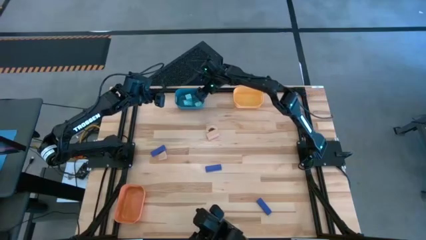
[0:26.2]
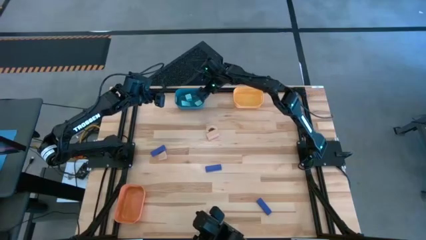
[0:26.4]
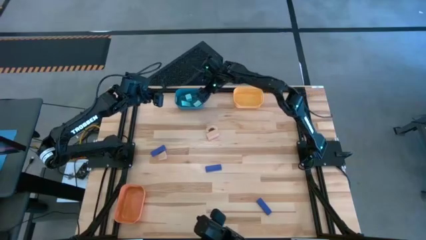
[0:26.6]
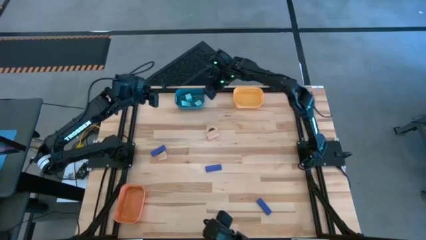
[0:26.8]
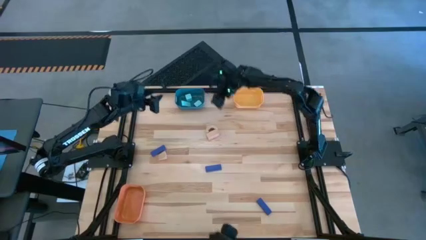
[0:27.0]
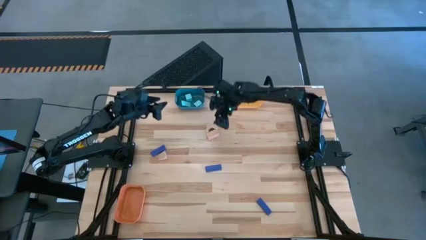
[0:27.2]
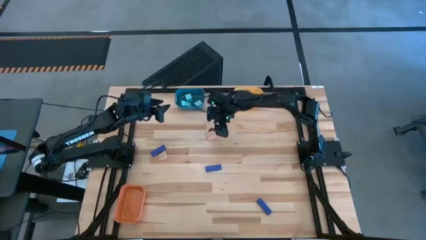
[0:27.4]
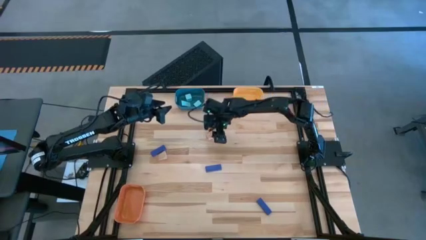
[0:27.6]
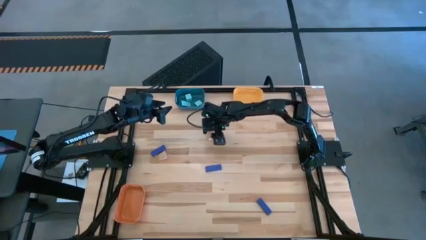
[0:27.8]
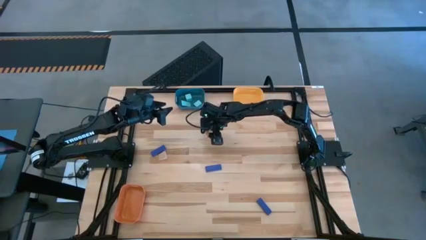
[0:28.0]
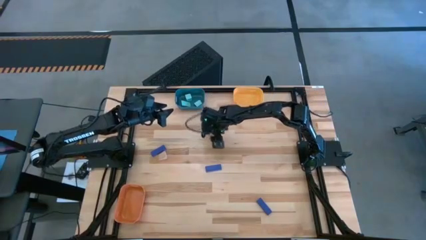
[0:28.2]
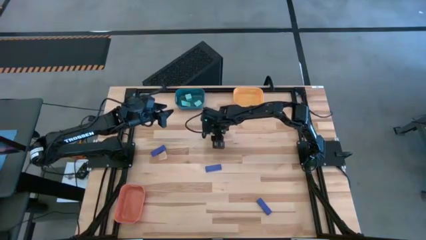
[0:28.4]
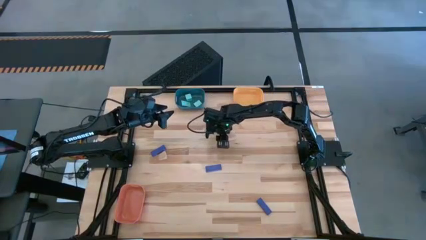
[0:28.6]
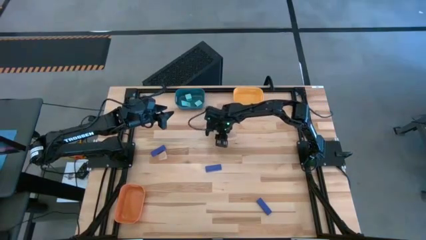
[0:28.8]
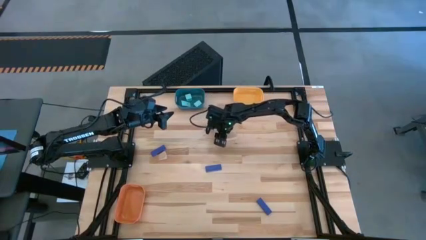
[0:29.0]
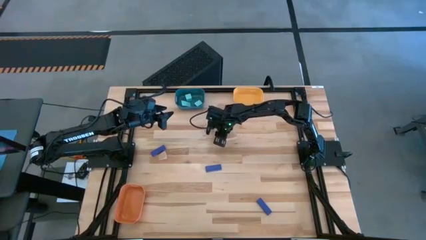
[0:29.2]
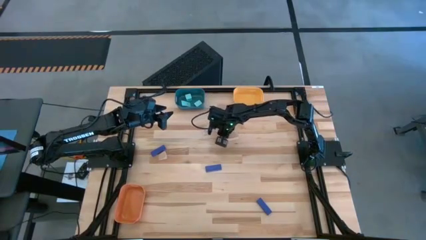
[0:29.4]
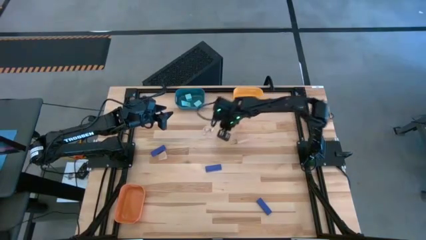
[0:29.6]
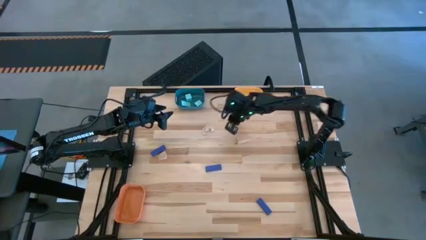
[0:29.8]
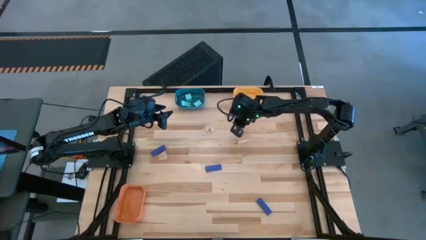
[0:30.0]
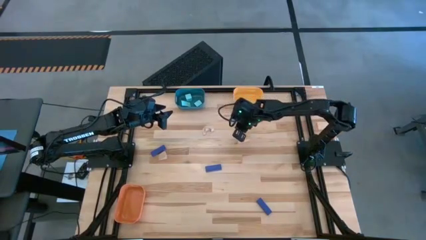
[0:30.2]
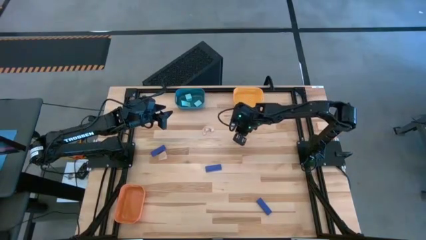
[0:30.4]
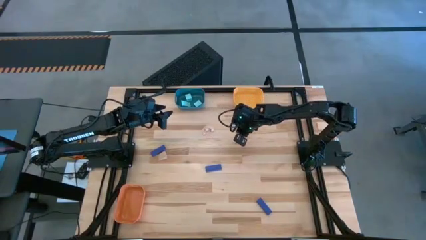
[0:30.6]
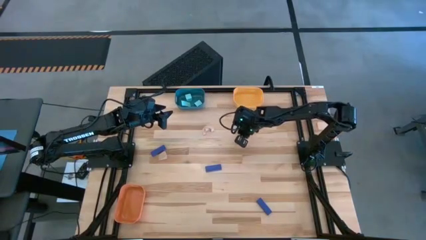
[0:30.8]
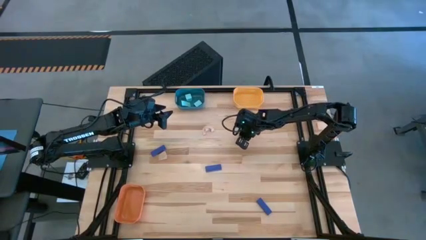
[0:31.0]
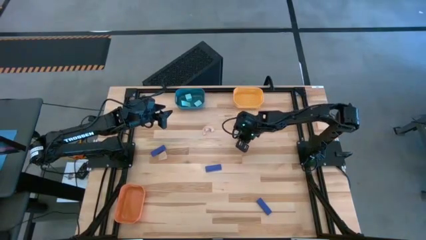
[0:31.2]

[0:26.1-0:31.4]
Task: Sort & place blocks by color
Put the bottom right brown block into the yellow bin

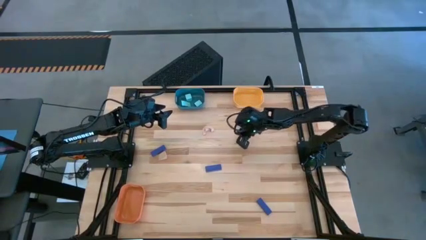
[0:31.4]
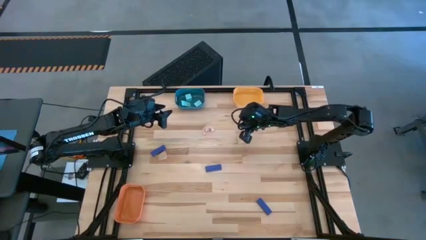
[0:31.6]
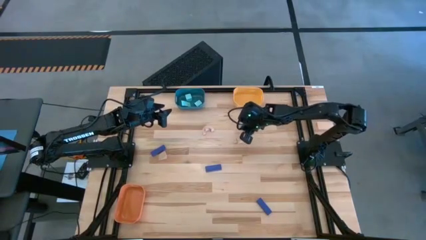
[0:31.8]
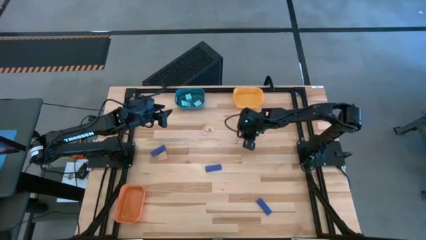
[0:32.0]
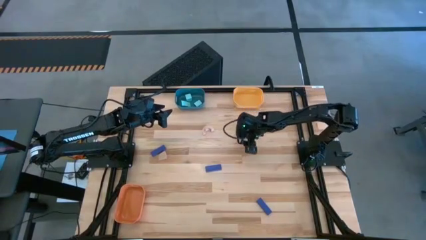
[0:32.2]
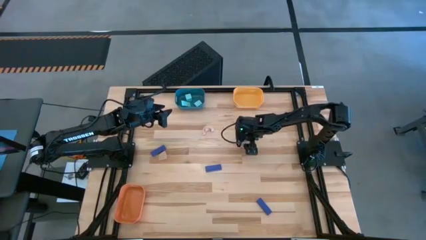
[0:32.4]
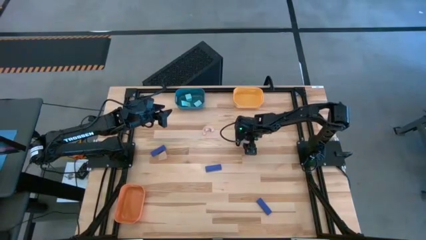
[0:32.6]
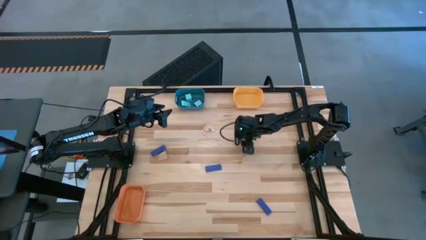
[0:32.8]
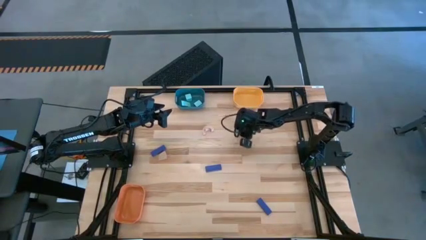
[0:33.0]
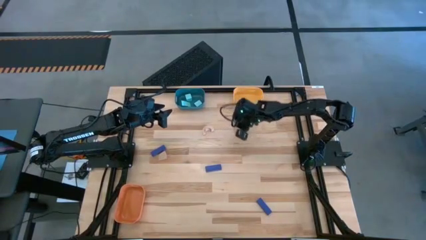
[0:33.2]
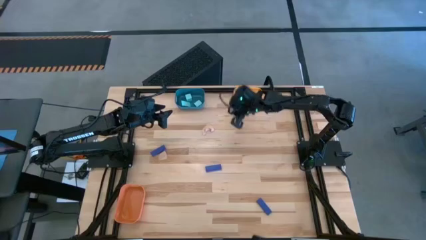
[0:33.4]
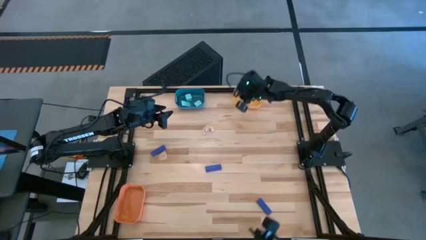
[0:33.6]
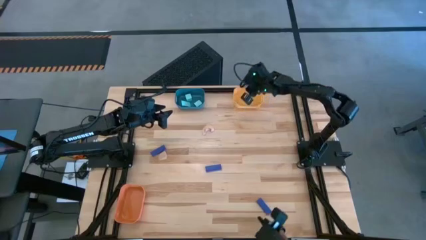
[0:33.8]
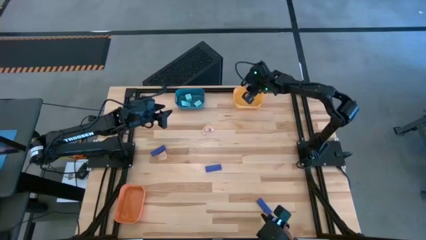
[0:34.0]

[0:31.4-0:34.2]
Put the bottom right brown block into the yellow bin

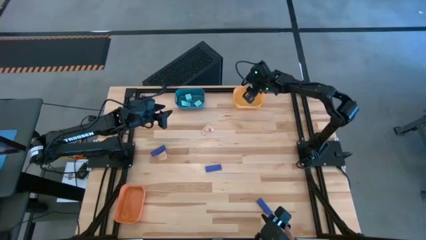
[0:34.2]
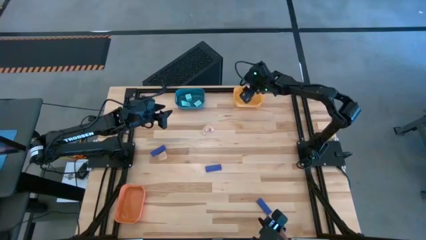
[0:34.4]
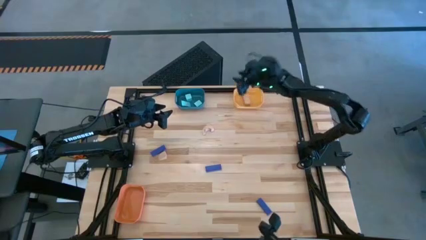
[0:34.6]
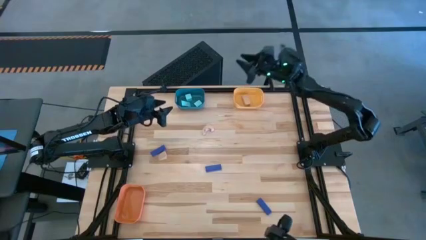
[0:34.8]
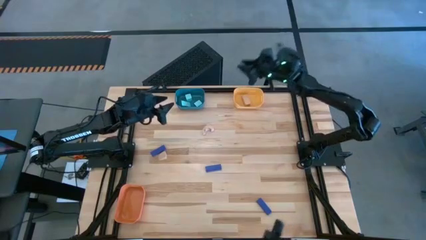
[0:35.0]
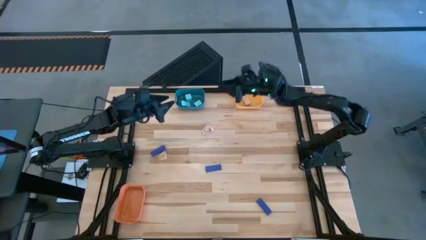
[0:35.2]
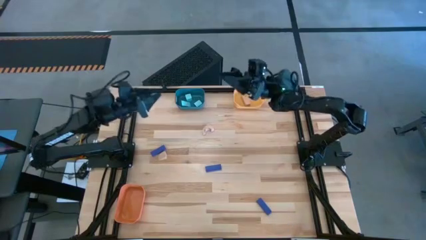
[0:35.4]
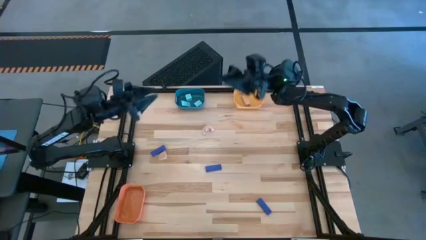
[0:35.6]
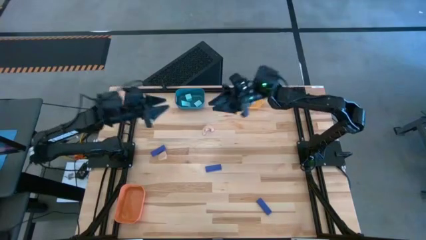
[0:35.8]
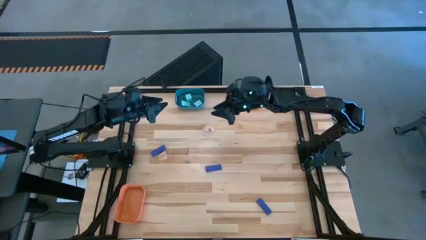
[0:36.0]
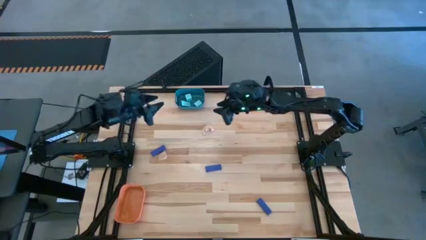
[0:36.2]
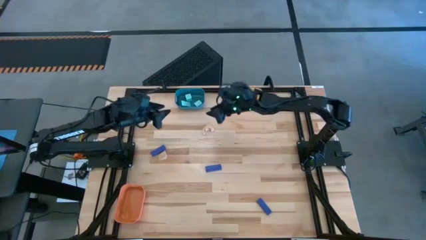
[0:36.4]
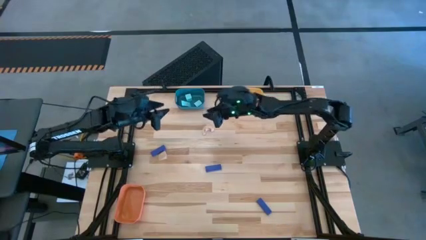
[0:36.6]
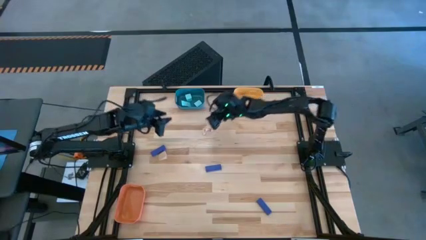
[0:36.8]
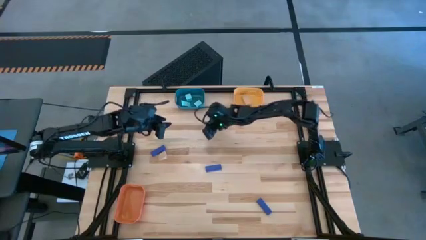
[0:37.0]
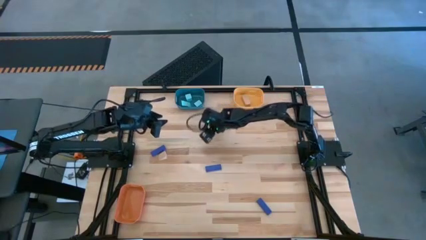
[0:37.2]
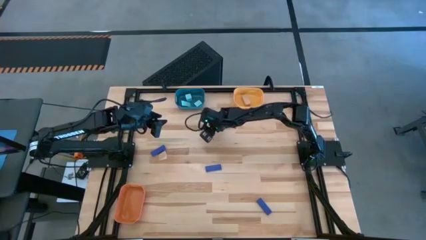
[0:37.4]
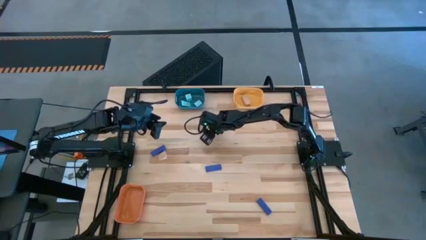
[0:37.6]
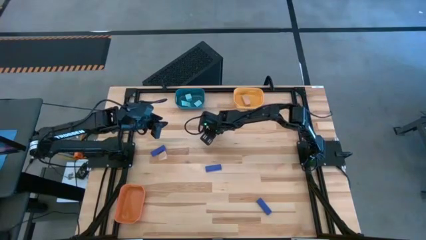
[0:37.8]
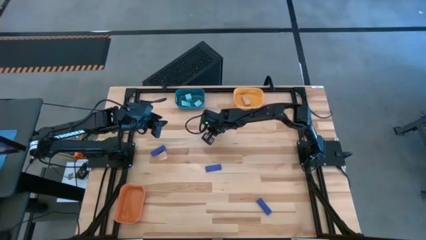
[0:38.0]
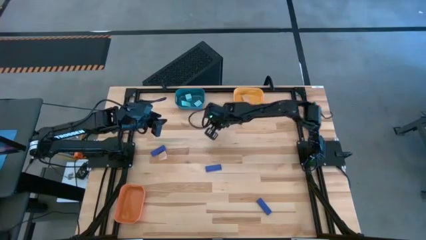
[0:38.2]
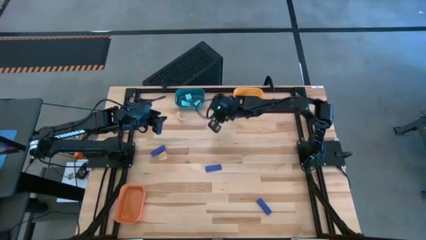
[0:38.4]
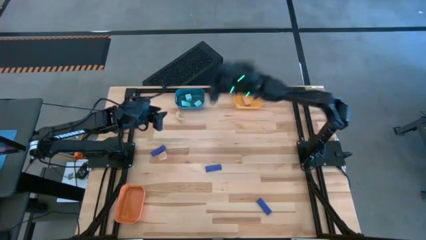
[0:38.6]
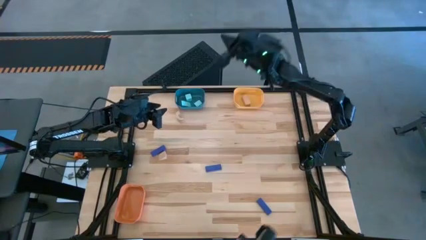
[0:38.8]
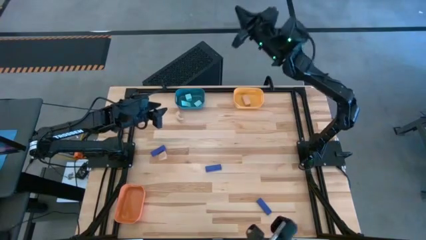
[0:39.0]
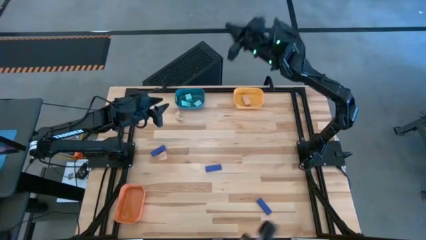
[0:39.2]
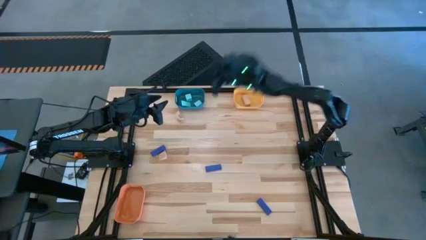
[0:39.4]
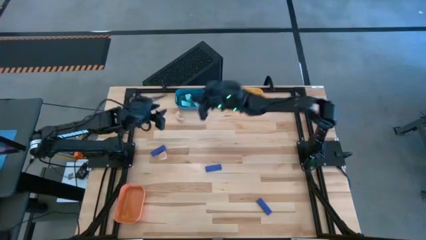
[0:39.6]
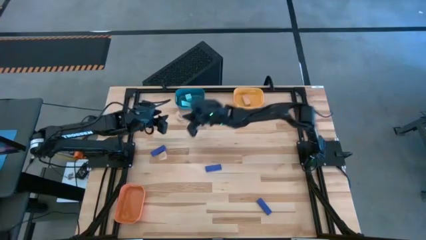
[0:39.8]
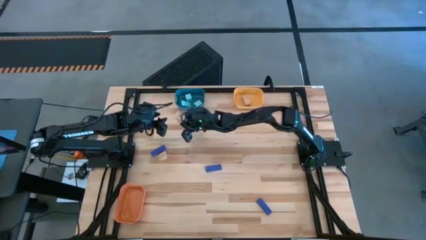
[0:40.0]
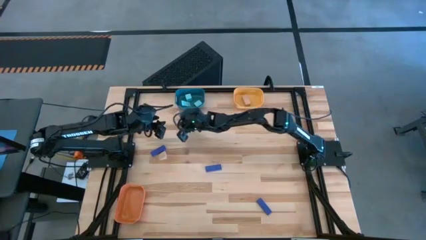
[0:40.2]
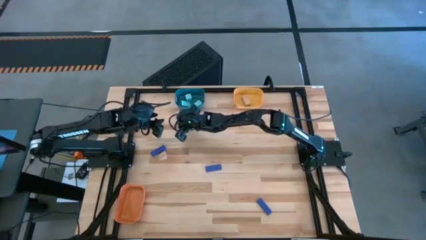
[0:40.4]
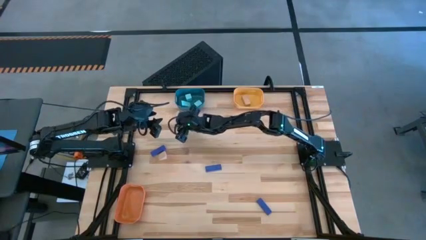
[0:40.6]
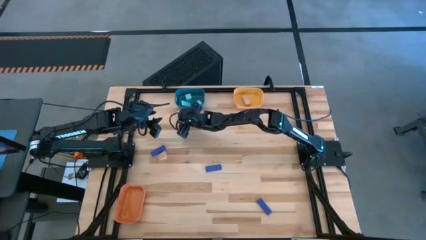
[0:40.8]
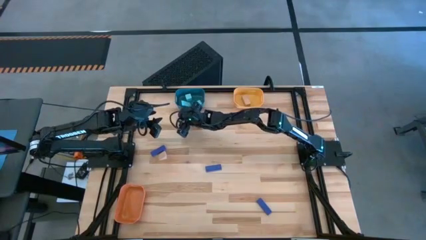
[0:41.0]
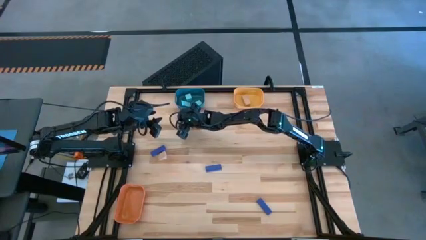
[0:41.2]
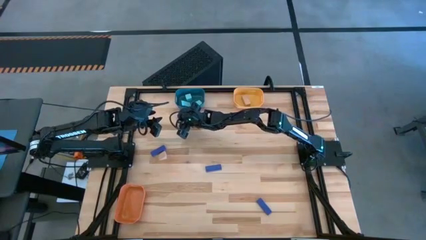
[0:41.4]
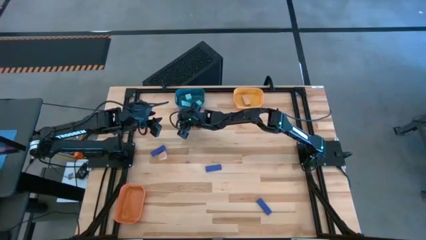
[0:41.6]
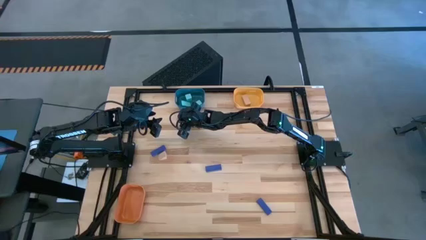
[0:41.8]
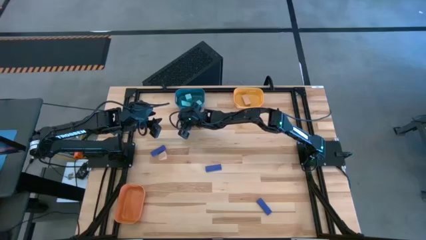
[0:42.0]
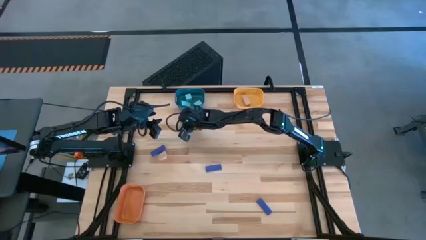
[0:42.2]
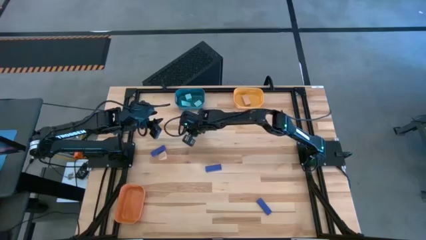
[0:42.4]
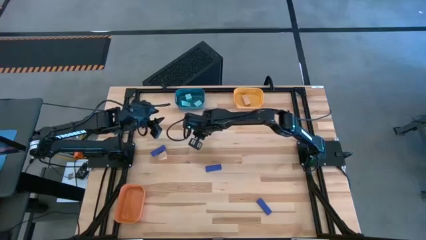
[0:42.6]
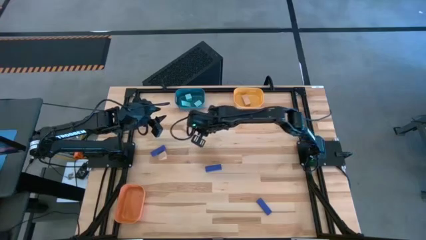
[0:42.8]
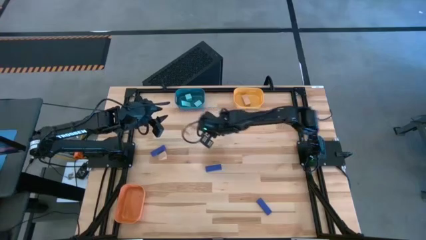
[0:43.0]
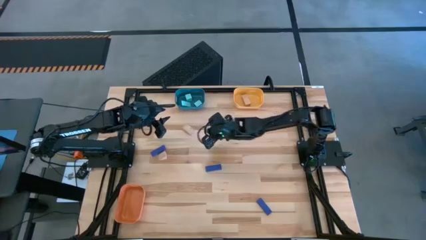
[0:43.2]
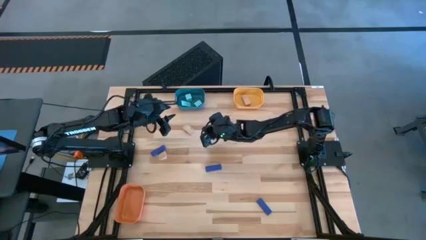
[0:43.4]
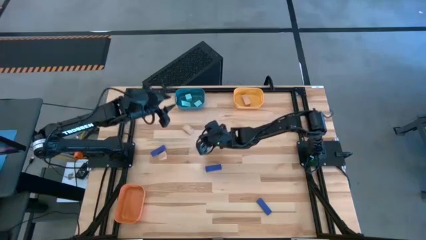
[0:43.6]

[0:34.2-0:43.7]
Put the top center brown block into the yellow bin
